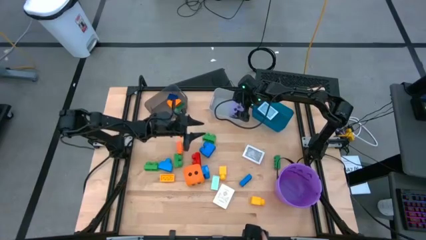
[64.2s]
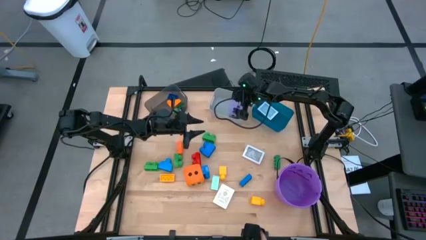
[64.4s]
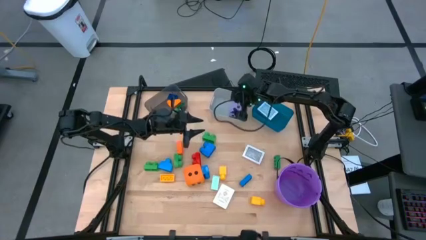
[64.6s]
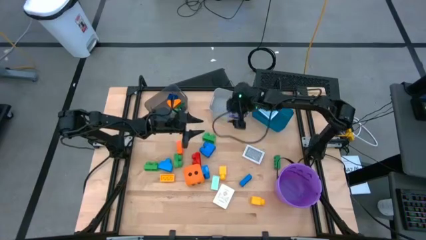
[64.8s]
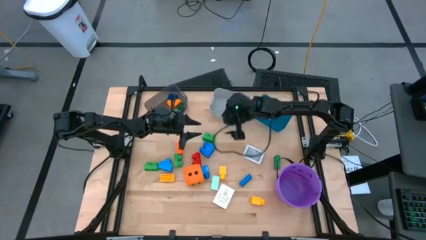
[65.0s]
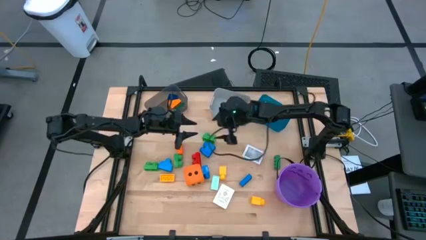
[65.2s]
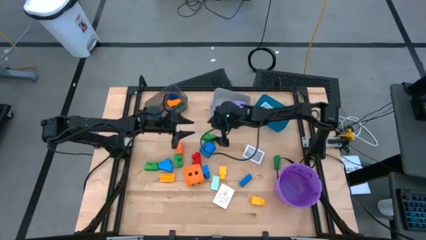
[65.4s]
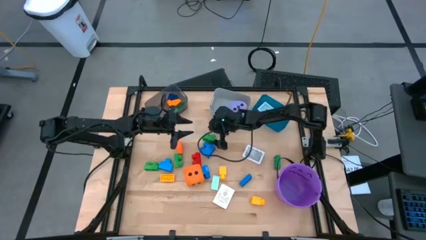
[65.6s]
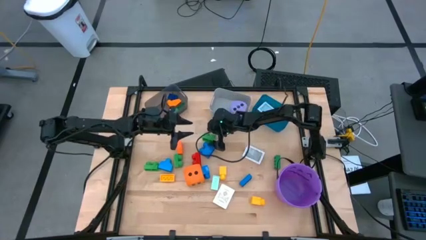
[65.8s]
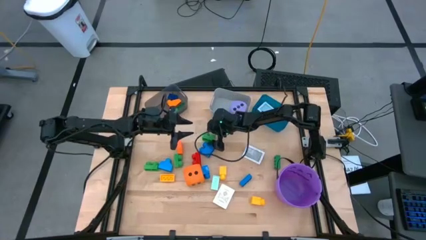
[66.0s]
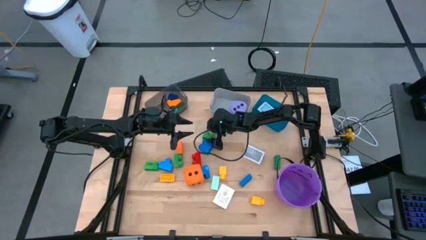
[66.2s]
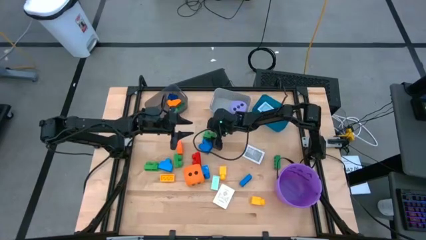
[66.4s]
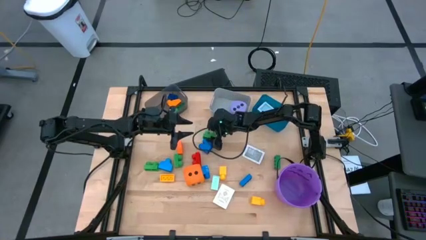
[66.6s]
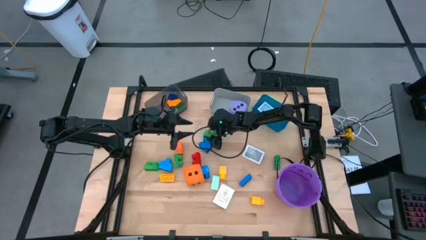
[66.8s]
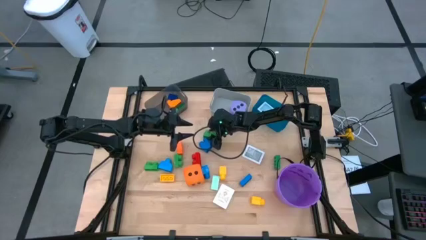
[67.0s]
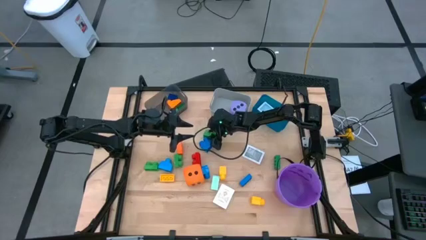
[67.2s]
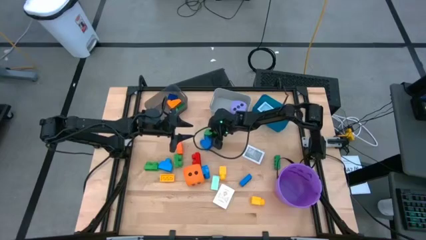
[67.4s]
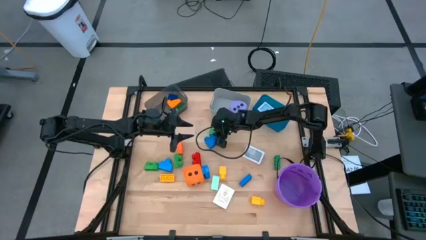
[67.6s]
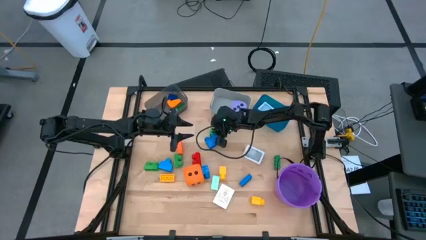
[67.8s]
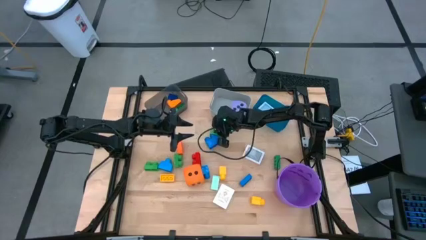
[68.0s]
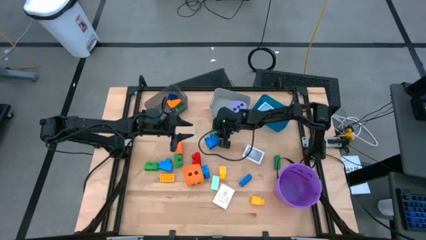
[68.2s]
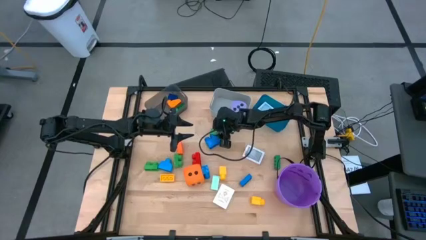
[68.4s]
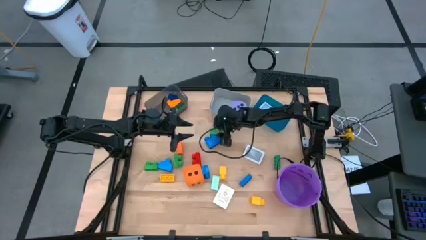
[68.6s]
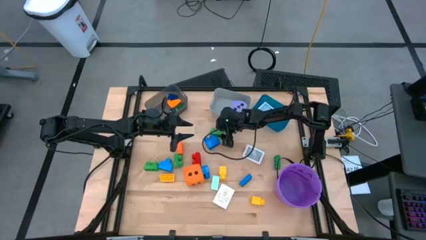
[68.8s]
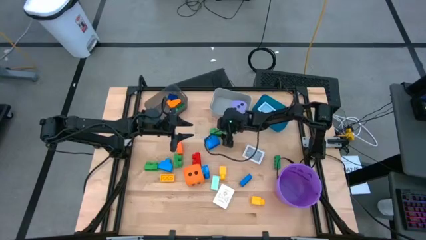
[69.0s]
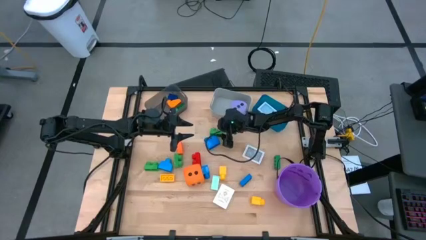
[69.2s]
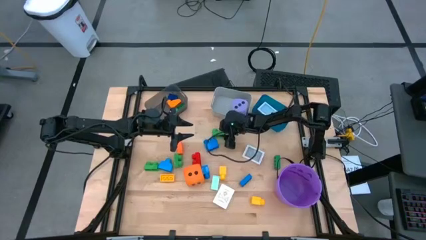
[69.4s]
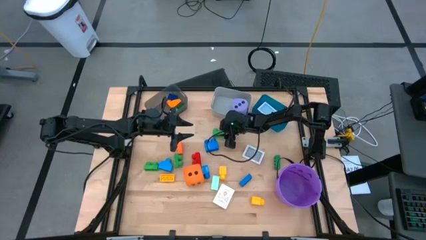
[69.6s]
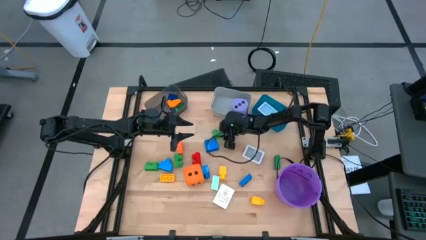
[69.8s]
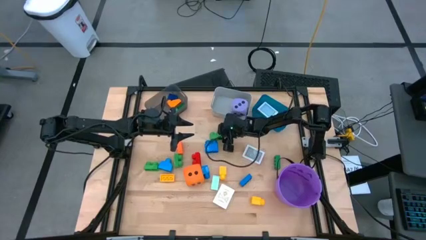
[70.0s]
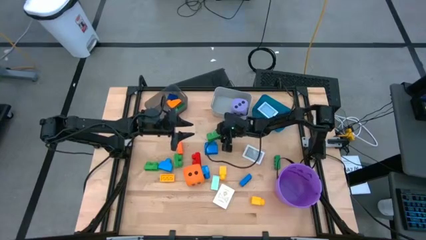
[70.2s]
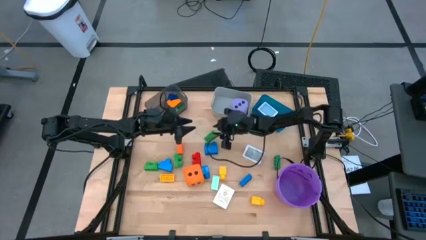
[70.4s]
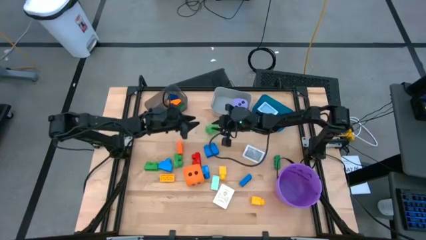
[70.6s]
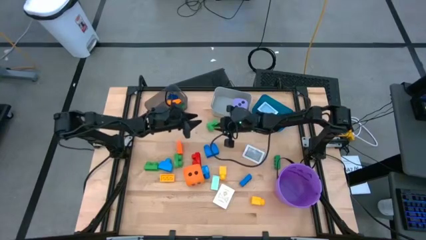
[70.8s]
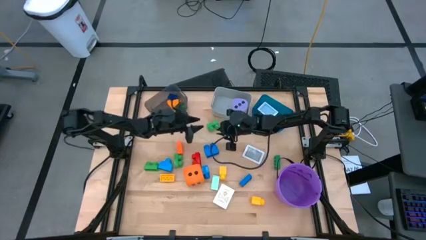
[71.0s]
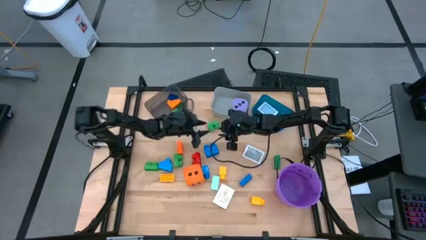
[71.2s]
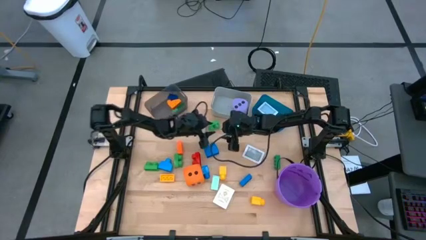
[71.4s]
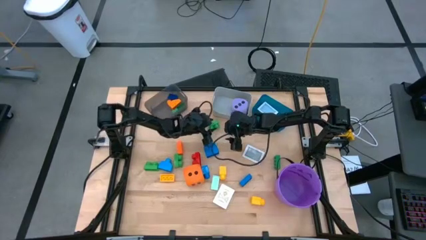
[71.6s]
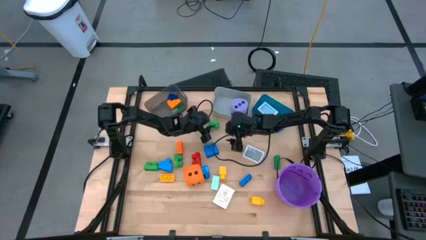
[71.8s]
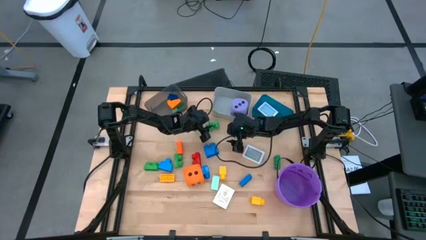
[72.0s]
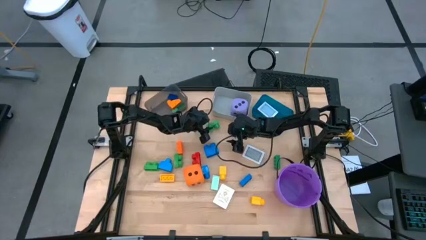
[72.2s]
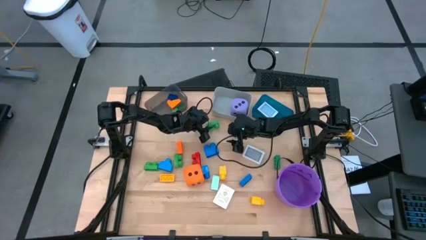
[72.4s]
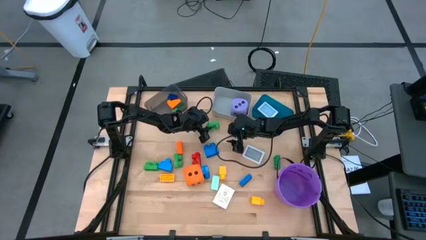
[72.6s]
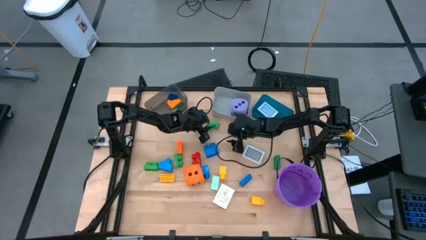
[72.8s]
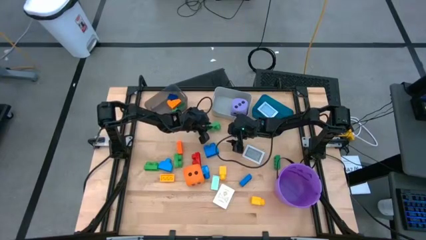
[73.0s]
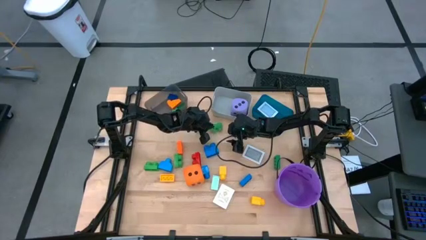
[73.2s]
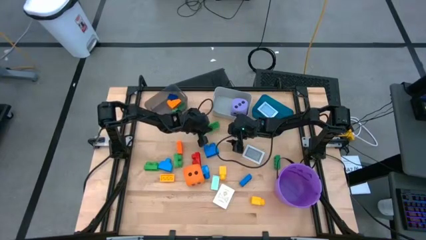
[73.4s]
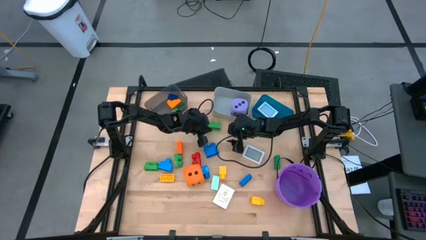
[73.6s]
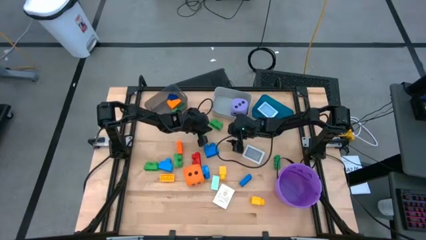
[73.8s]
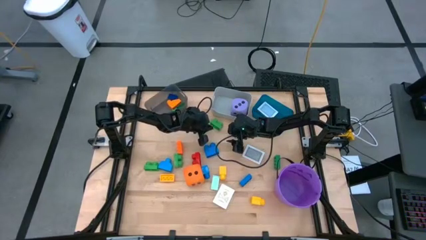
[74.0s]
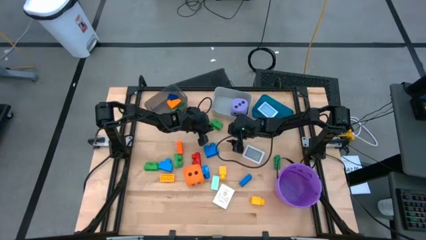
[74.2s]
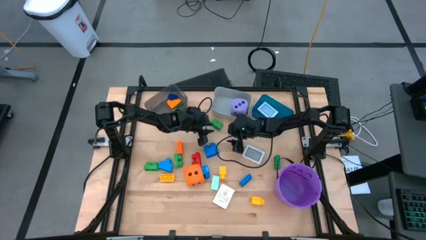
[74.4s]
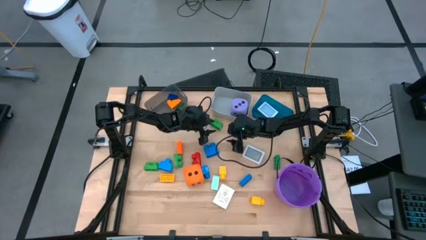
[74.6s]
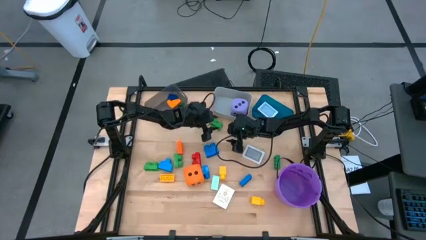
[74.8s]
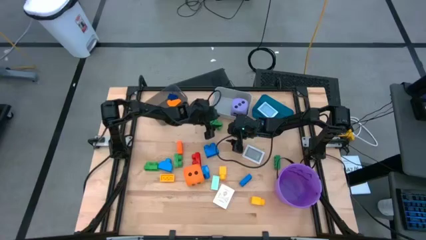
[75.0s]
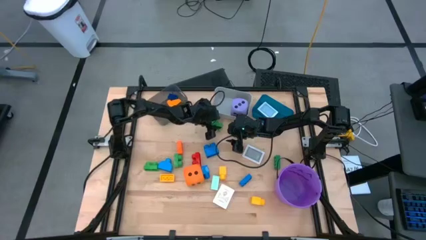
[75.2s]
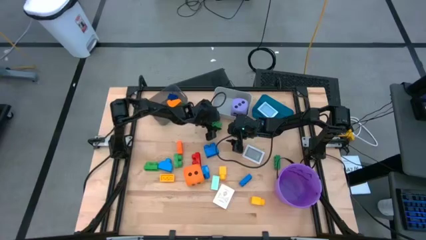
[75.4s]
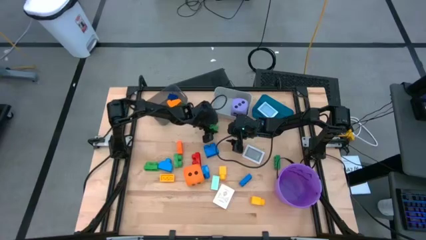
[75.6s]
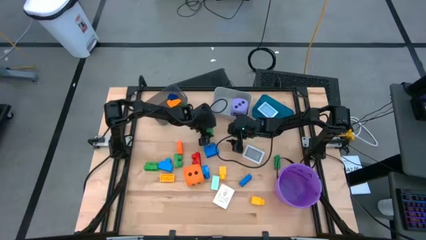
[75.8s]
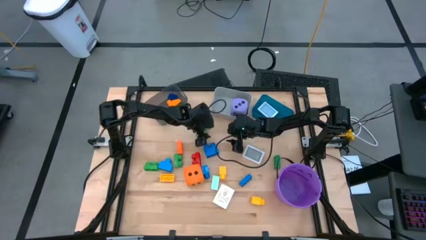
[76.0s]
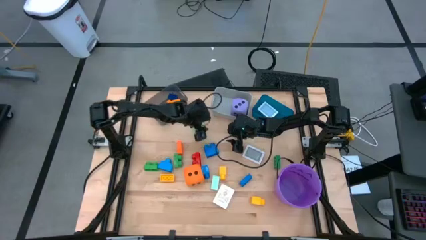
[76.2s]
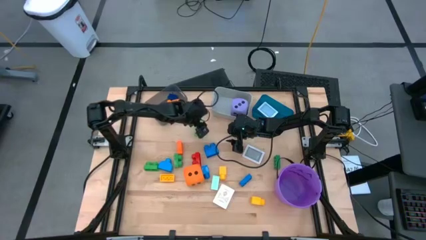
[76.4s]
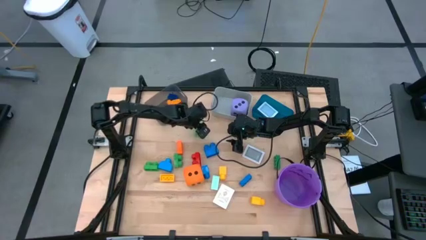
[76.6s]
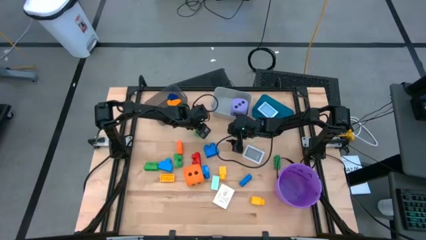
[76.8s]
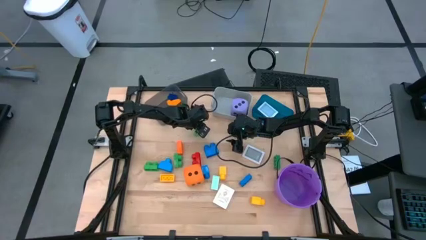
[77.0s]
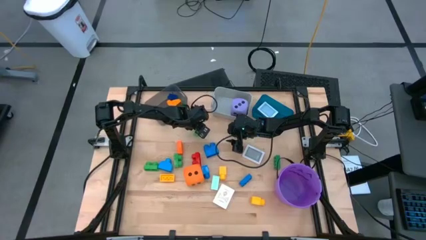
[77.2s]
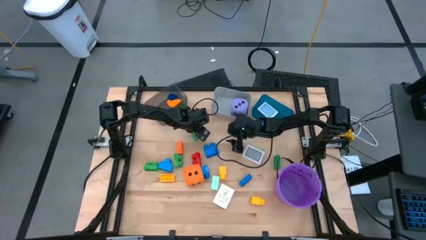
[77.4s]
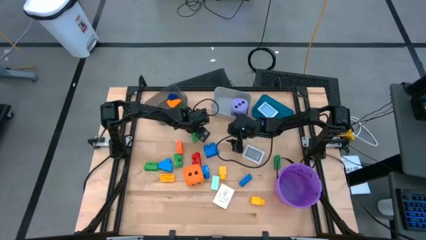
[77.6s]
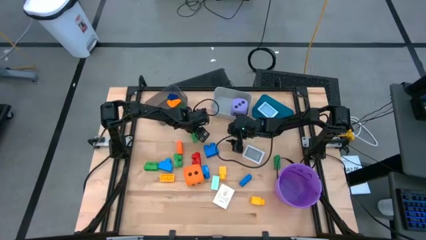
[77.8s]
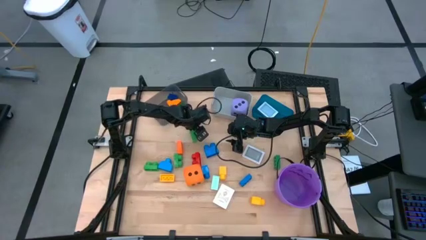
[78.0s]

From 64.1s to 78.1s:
Task: Pick & Place Toys
Put the green gamepiece into the black bin

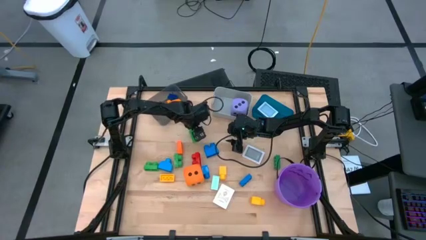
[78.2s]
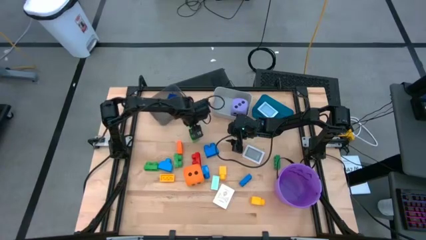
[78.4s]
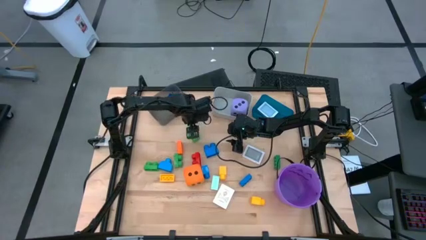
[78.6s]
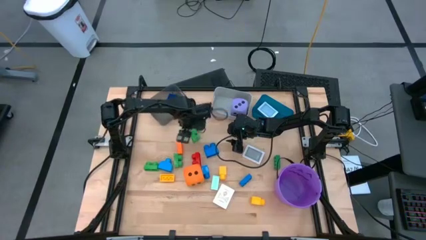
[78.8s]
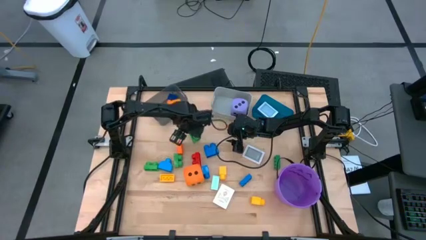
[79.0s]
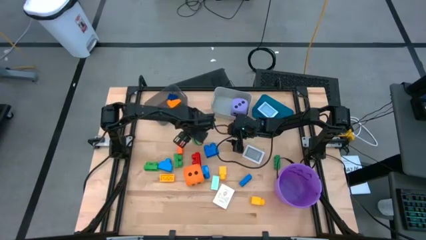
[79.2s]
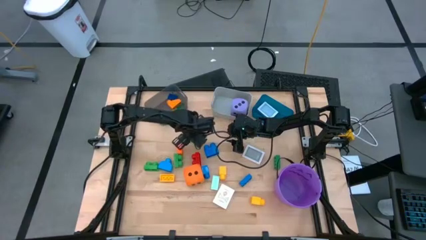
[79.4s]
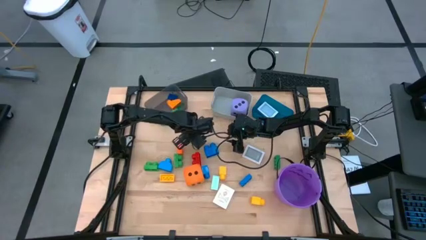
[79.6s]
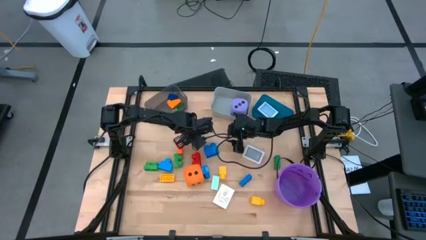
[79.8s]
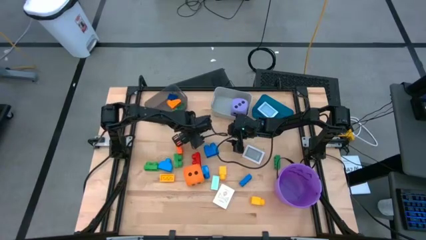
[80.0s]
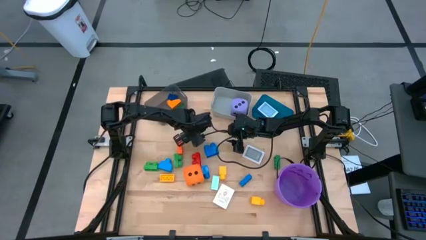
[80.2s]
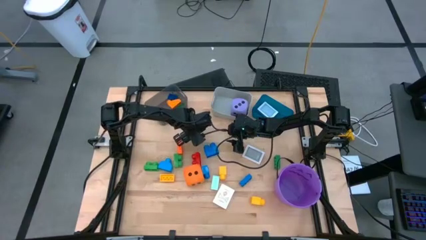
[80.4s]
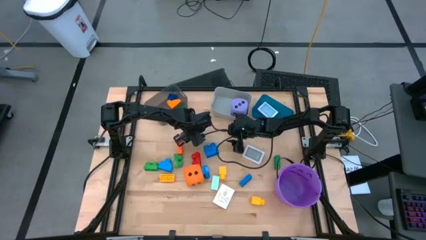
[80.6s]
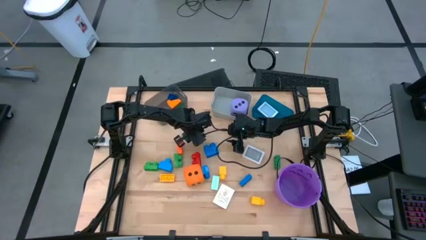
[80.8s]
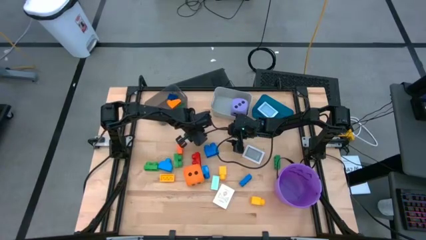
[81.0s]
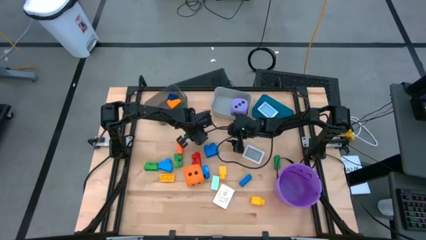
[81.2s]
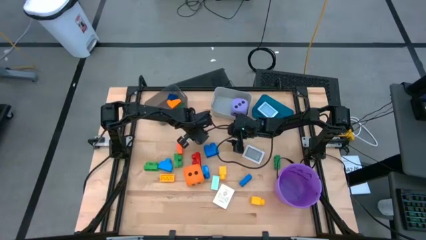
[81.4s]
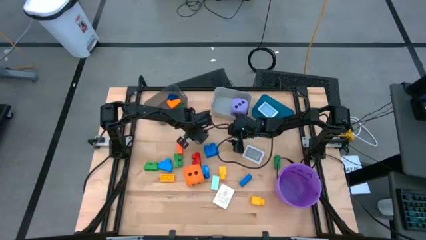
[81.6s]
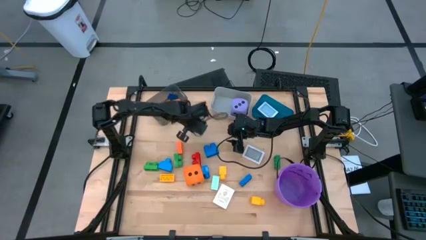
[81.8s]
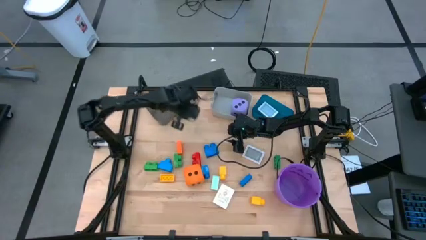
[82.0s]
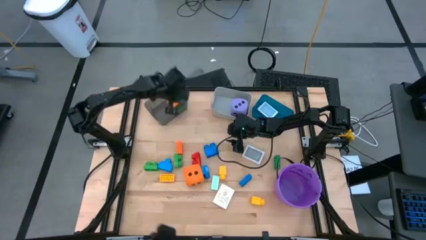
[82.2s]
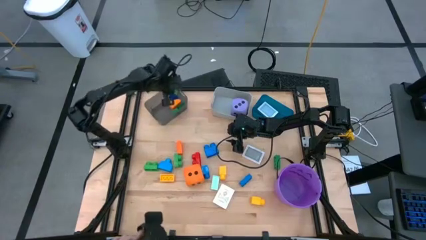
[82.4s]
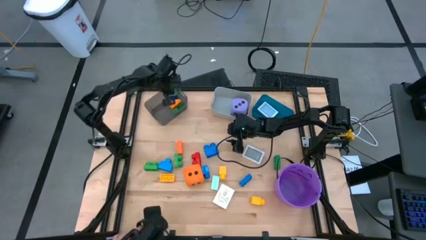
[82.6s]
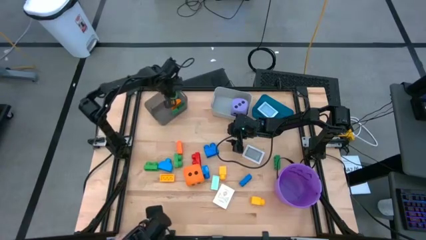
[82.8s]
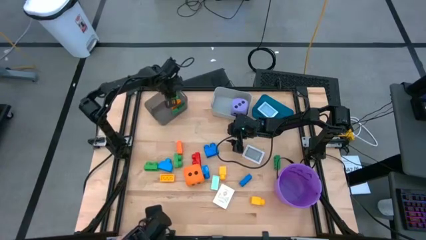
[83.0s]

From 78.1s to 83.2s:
Put the green gamepiece into the black bin
